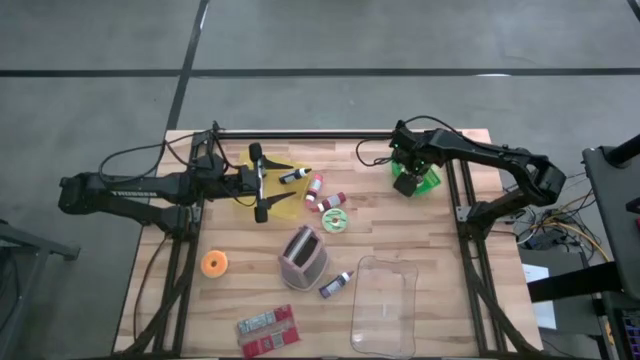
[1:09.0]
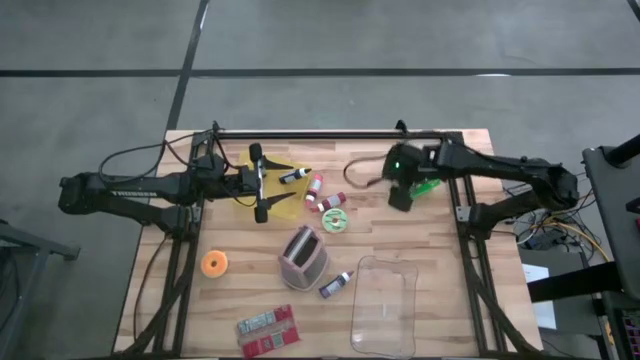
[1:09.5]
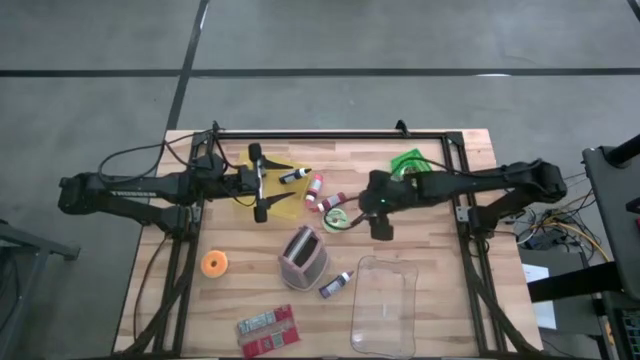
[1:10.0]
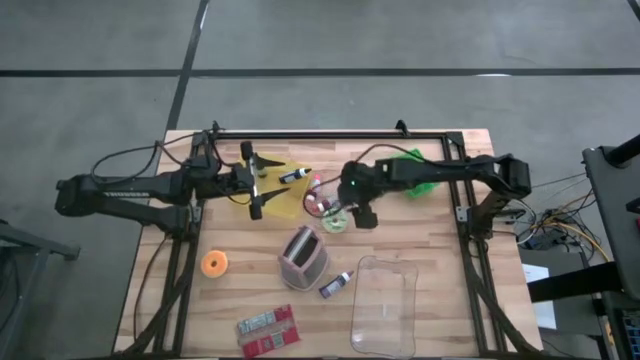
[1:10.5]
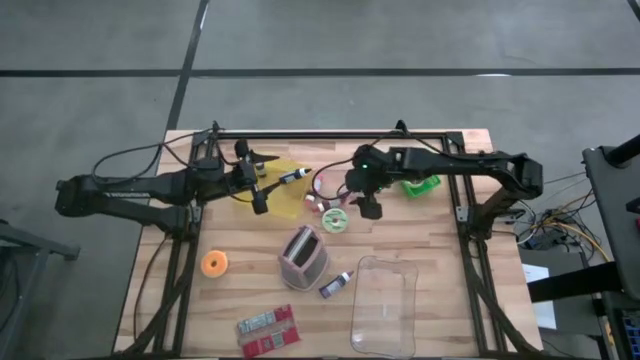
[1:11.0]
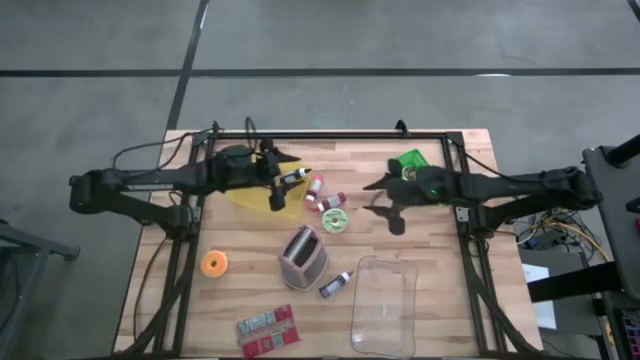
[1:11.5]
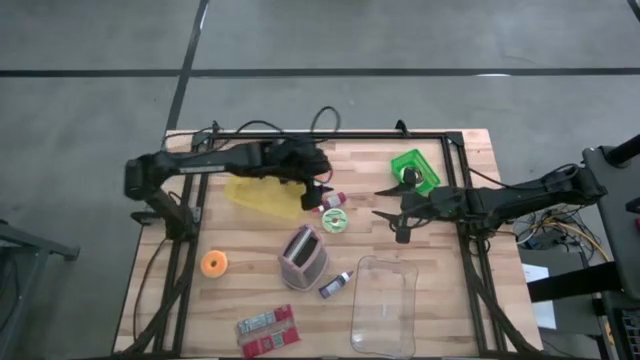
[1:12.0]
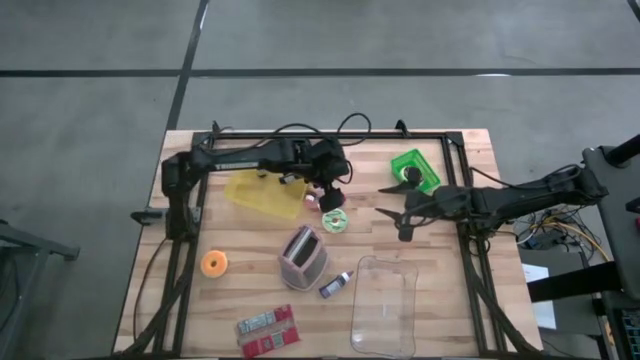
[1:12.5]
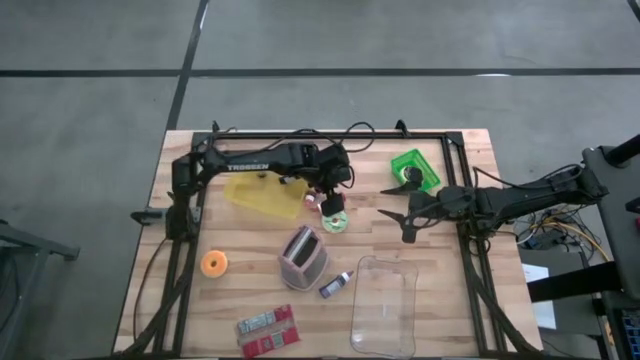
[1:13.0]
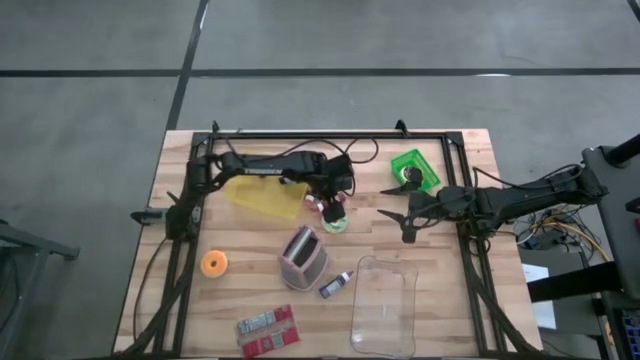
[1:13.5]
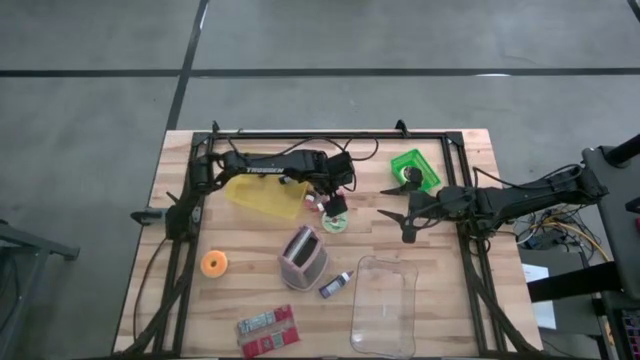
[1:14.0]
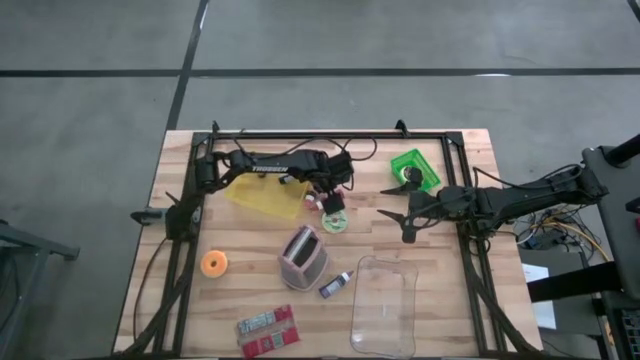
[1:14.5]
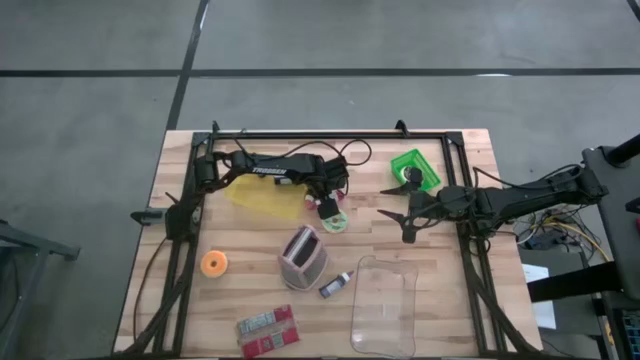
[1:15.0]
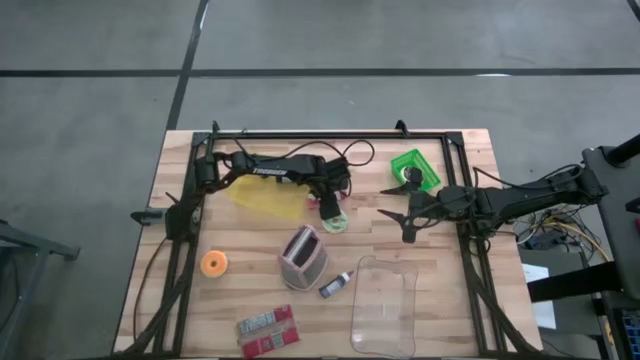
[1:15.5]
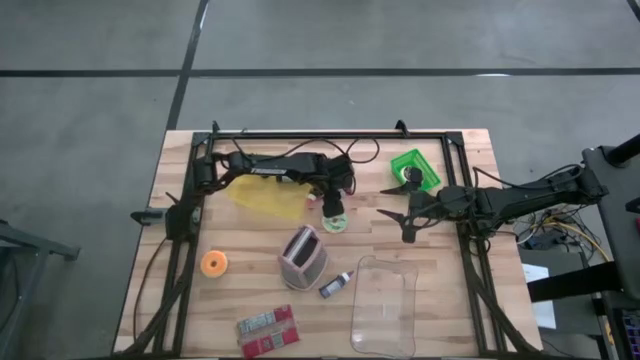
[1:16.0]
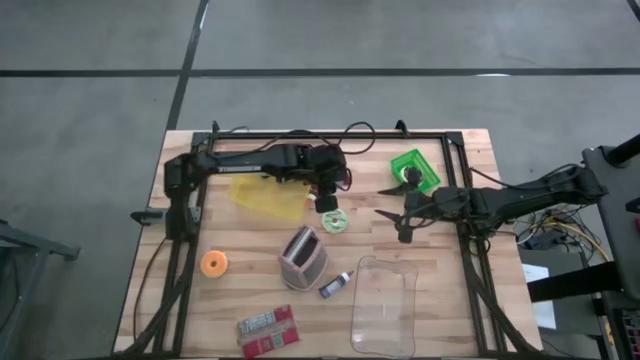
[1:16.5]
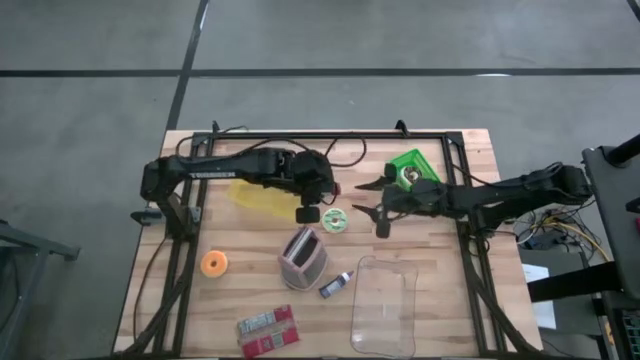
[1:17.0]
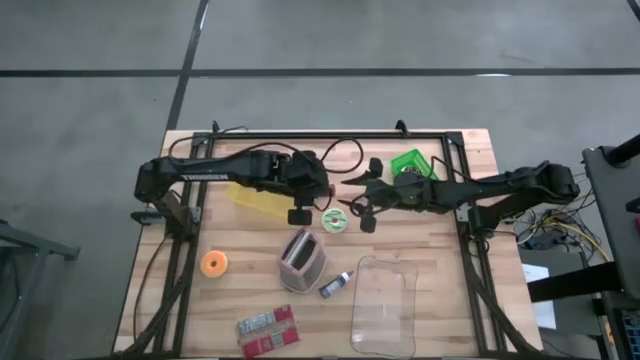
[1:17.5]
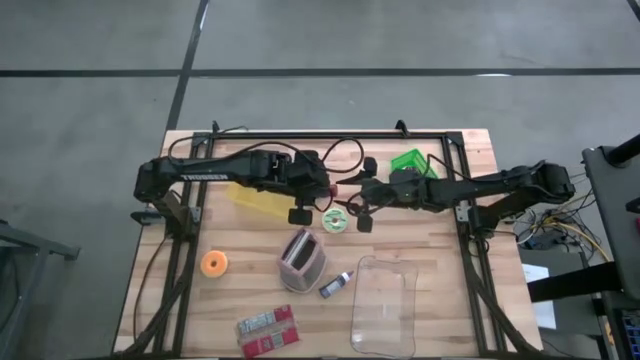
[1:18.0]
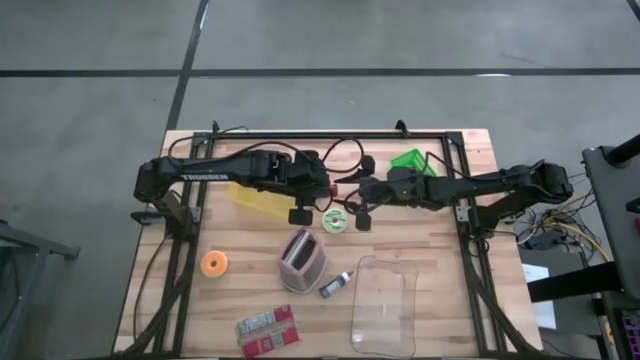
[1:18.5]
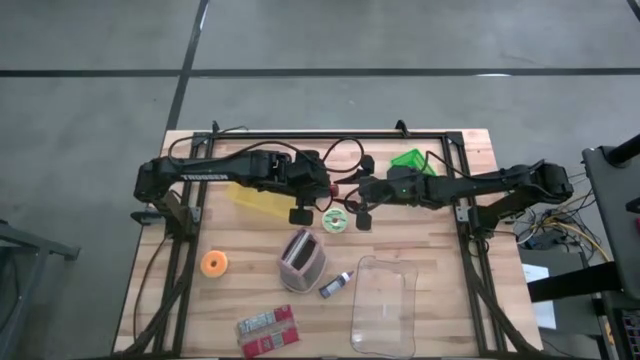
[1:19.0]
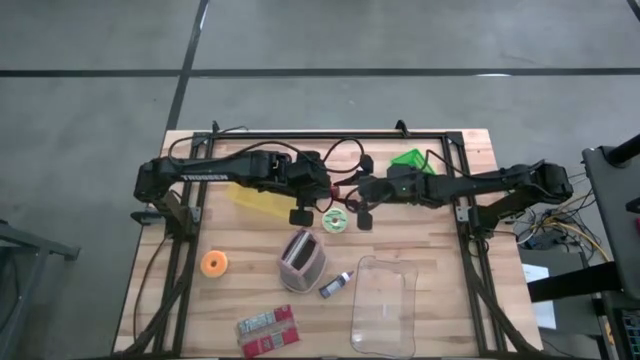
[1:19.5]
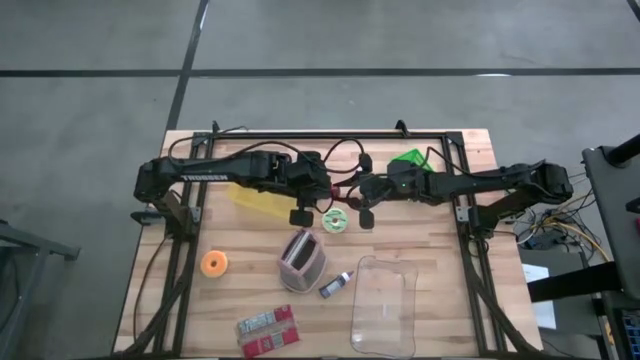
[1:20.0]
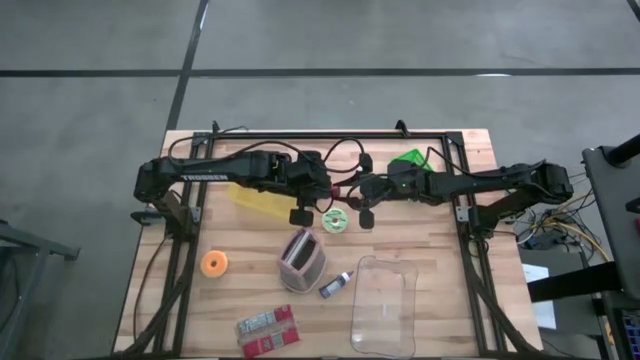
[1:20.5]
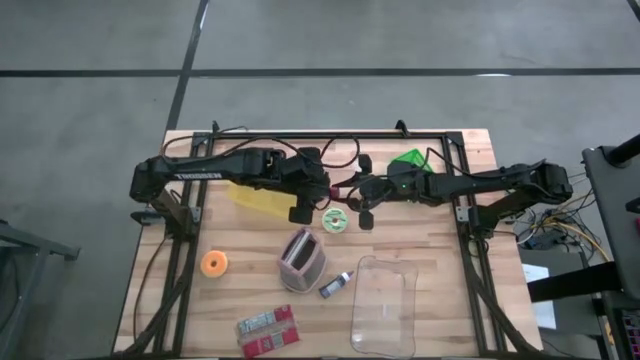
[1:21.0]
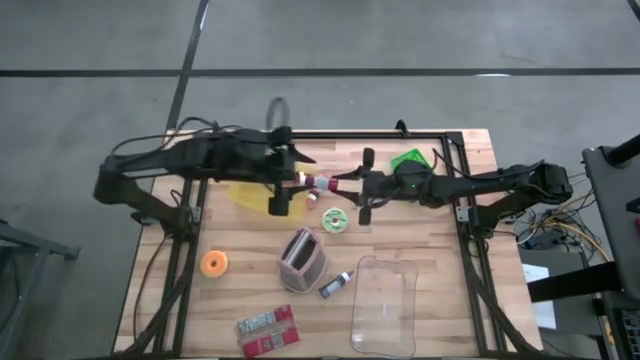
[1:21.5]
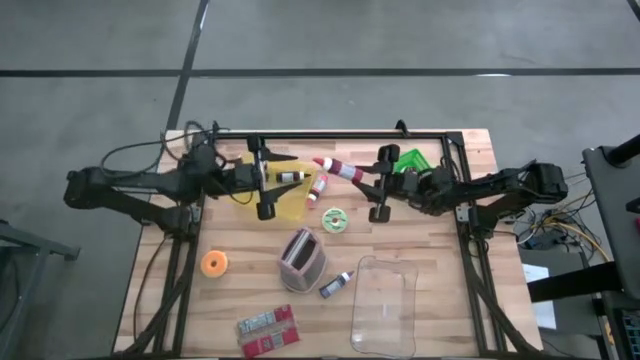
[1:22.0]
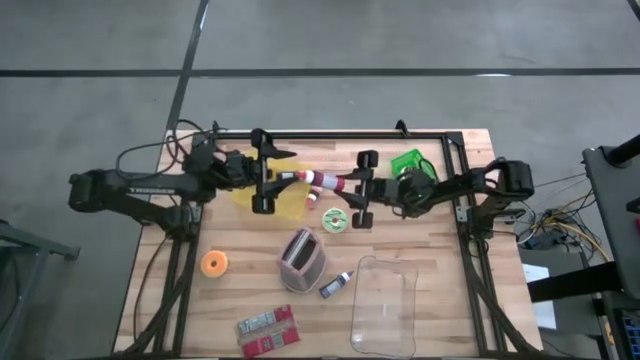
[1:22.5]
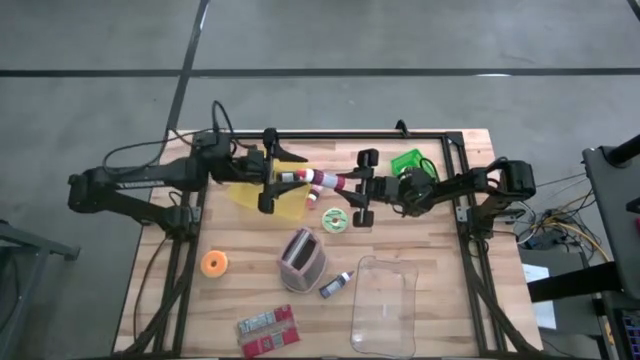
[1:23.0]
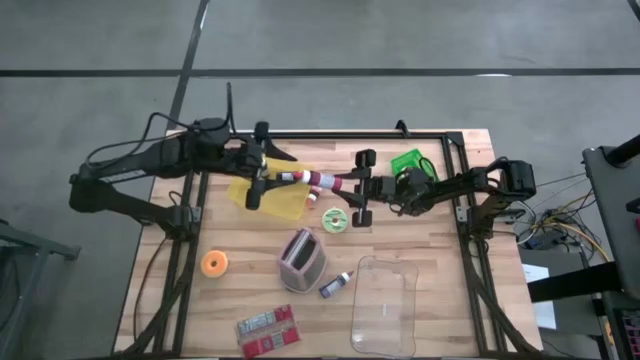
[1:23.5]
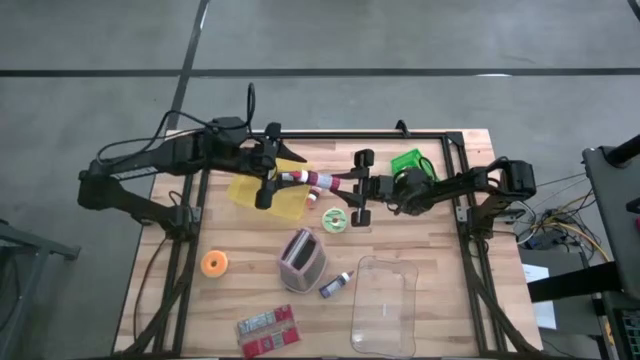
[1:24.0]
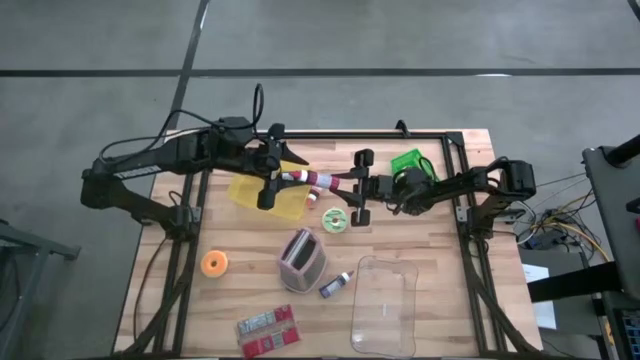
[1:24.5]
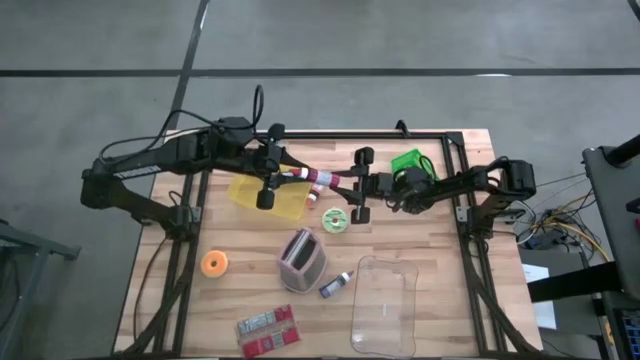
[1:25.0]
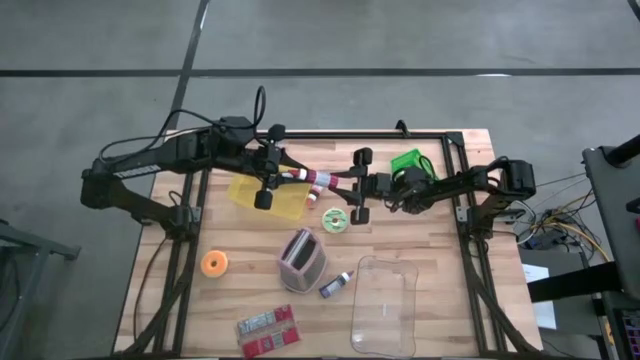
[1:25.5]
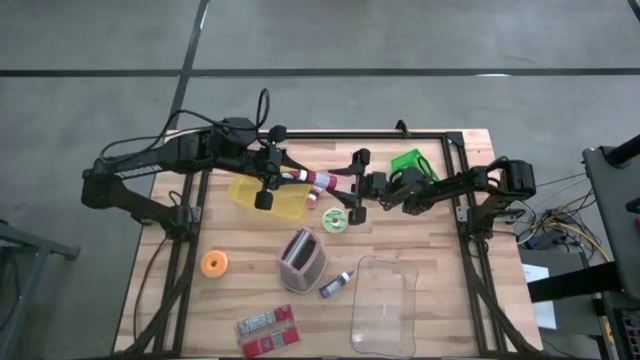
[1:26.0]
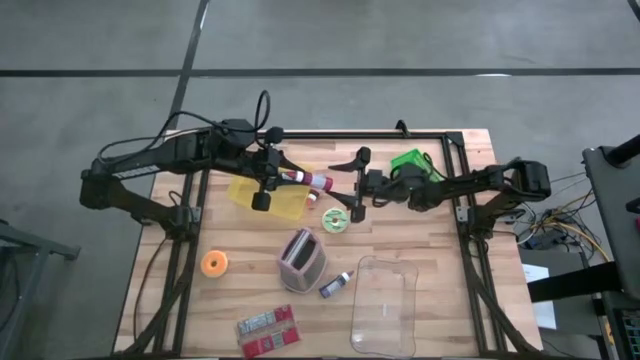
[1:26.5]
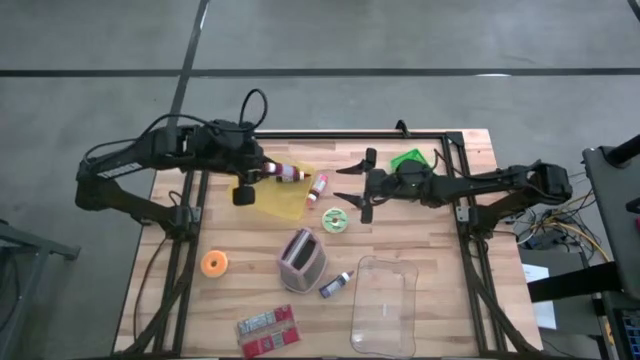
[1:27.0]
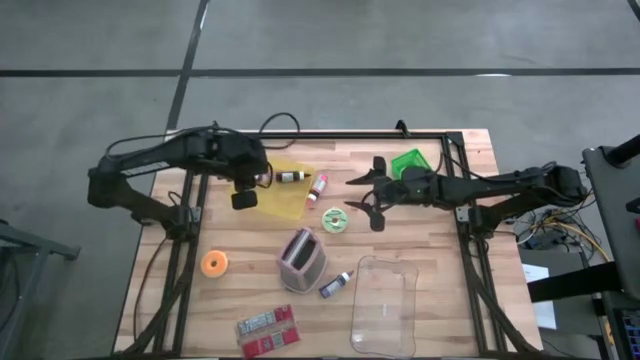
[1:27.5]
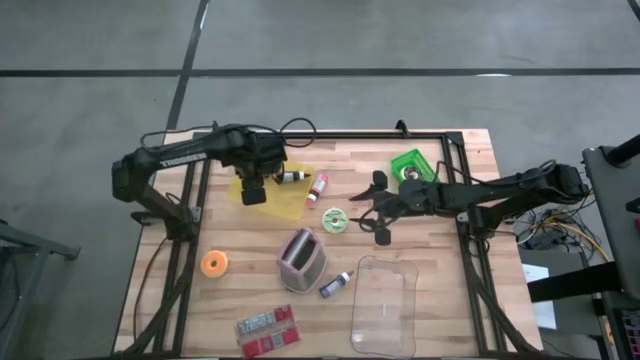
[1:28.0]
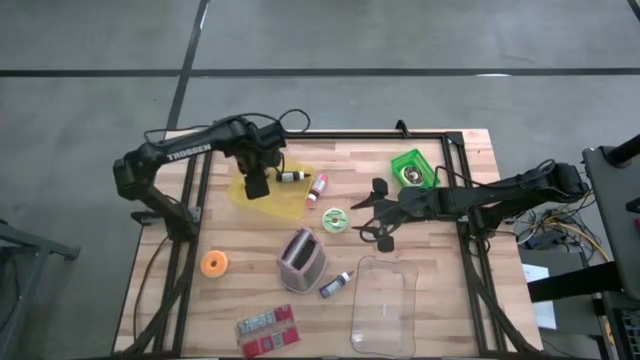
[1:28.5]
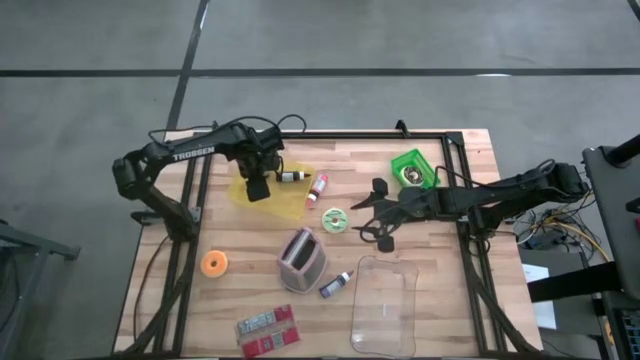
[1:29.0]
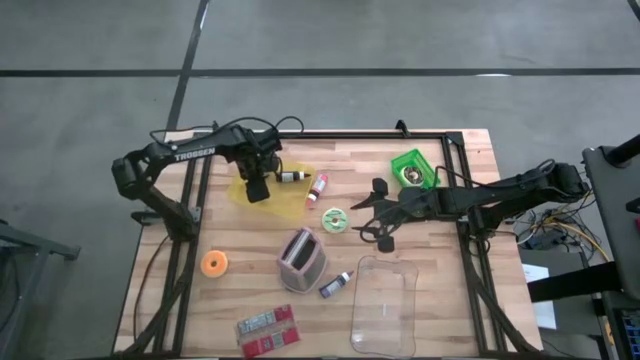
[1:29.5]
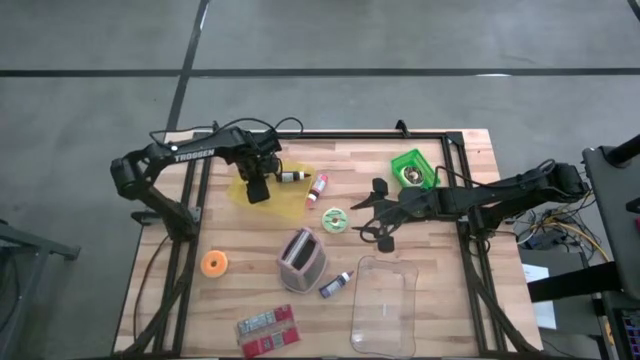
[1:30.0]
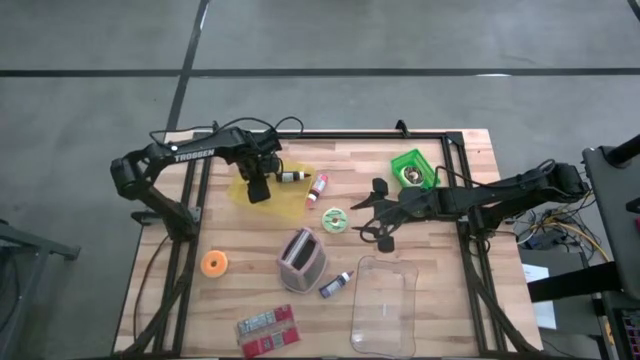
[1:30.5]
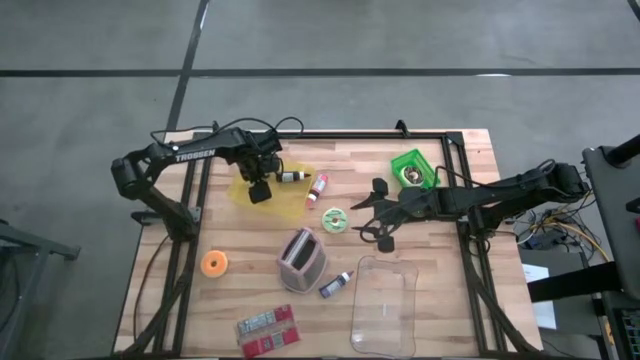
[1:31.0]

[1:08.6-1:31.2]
Task: Pick & Place Food Item
Put the red food coloring into the yellow bin
